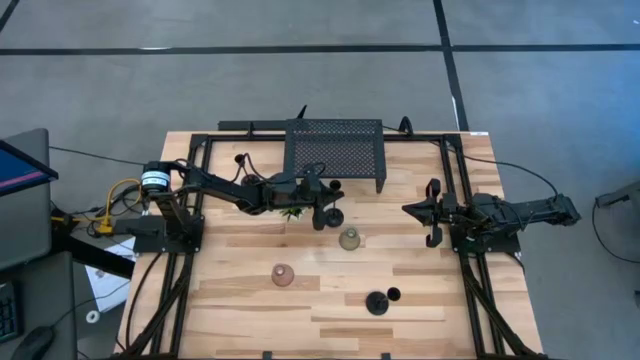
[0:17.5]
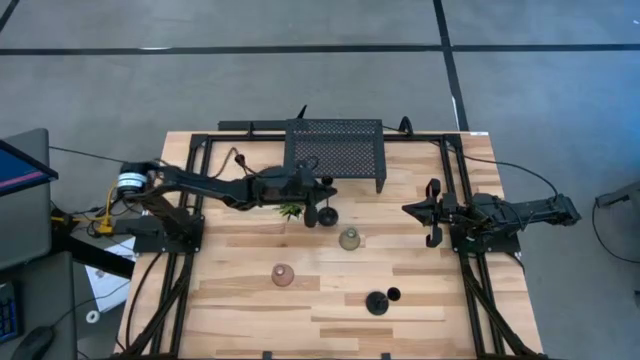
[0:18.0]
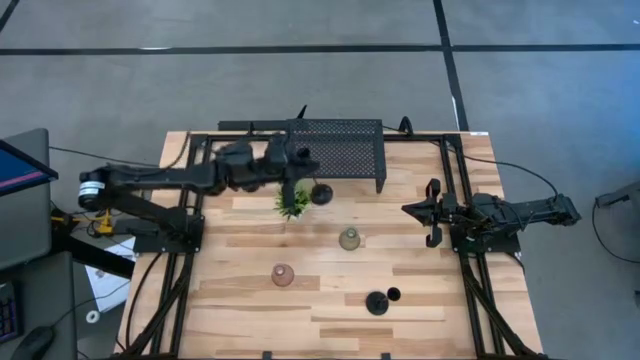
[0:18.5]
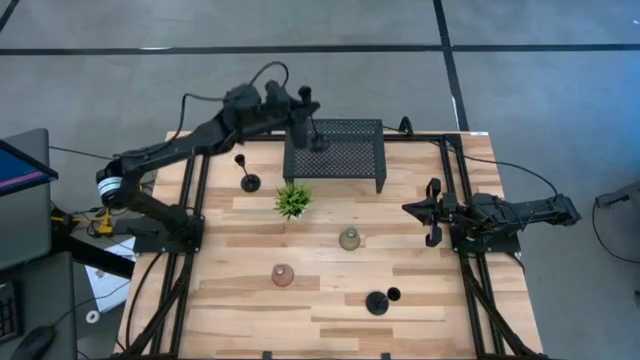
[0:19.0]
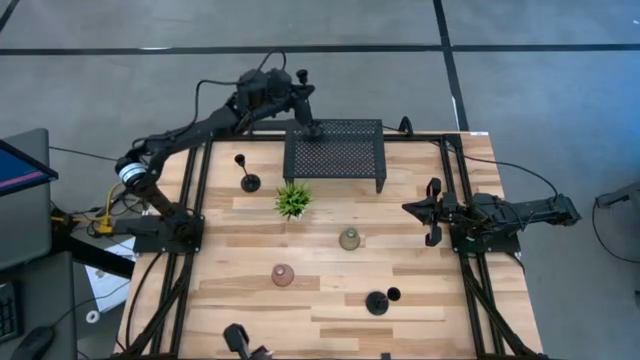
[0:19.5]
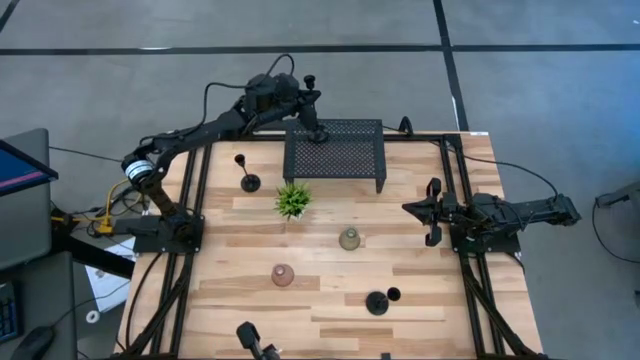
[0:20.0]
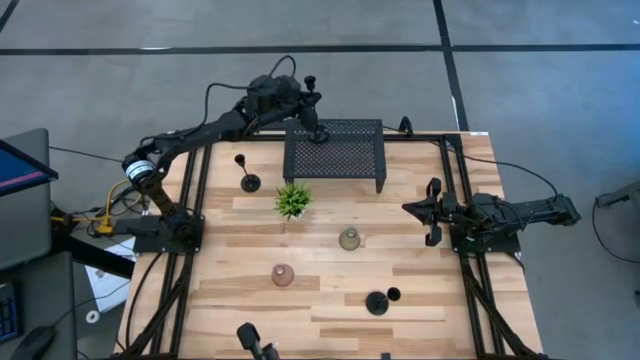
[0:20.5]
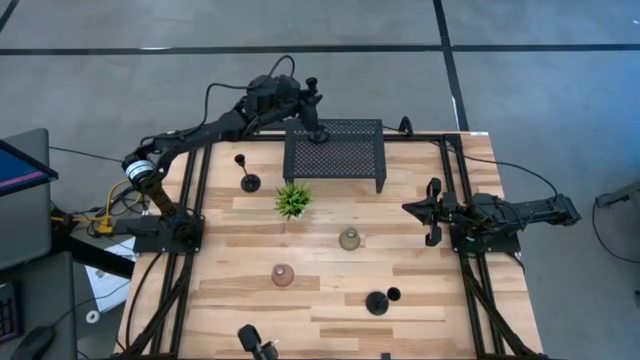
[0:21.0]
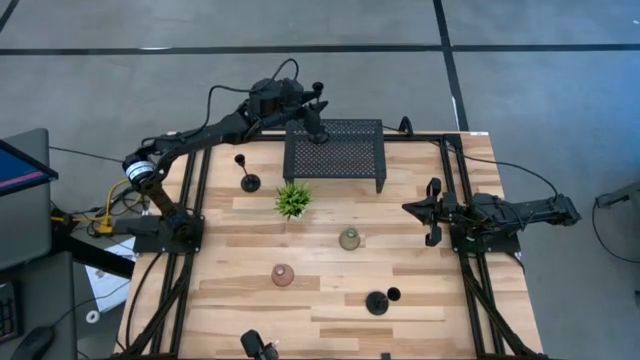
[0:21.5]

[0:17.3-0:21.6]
Task: Pick & Place candle stick holders
Put the middle black candle holder on the shelf

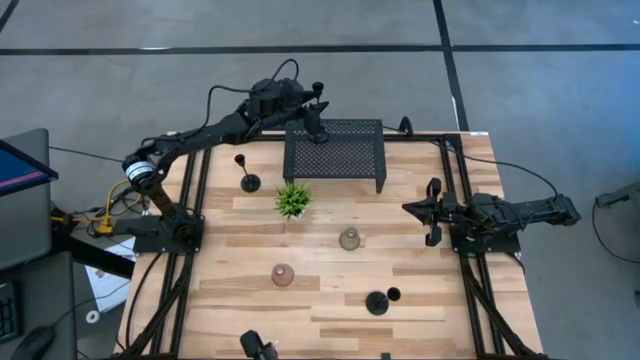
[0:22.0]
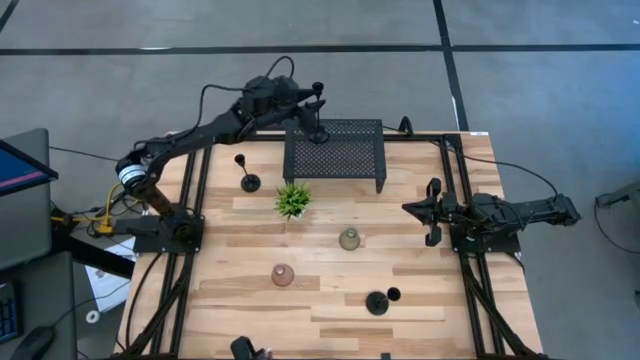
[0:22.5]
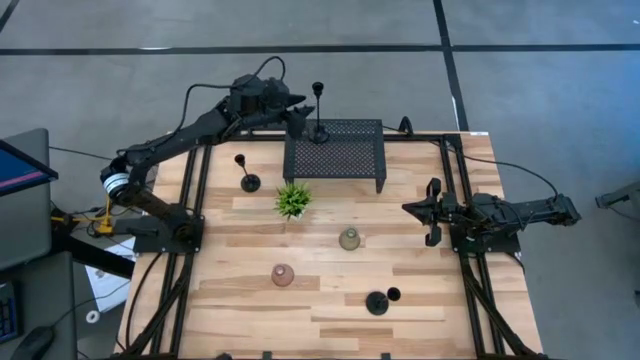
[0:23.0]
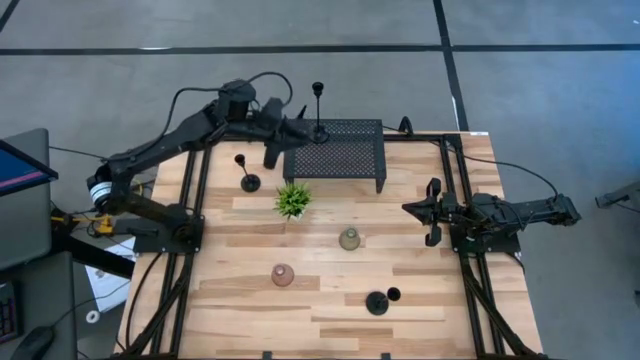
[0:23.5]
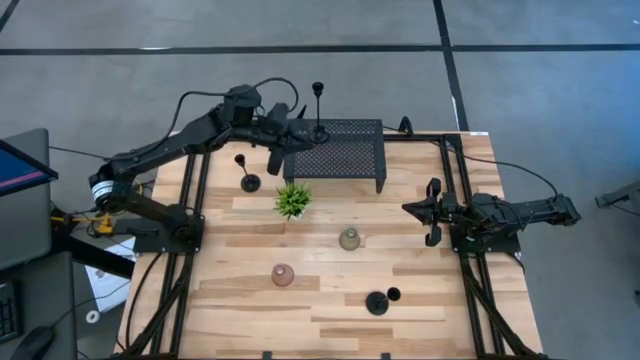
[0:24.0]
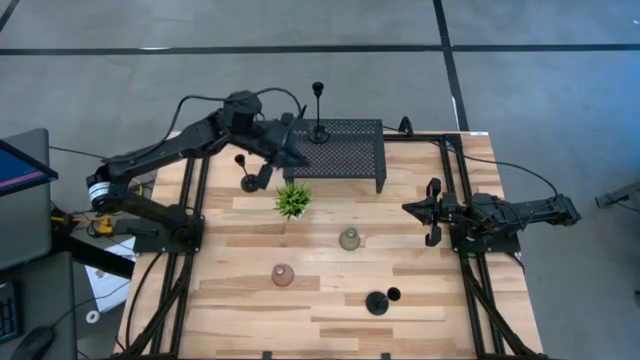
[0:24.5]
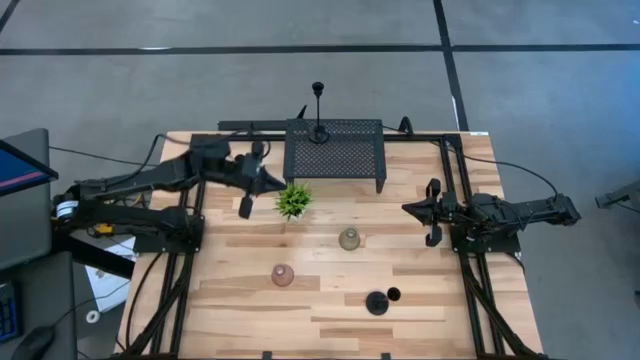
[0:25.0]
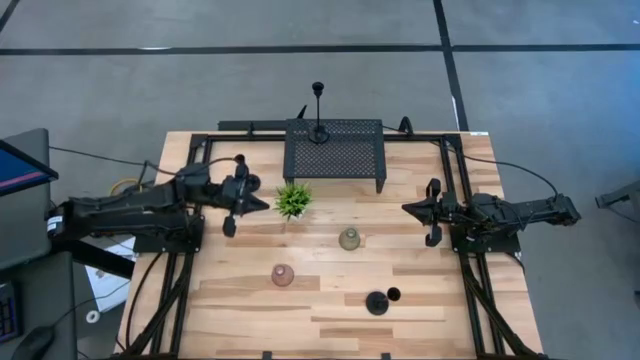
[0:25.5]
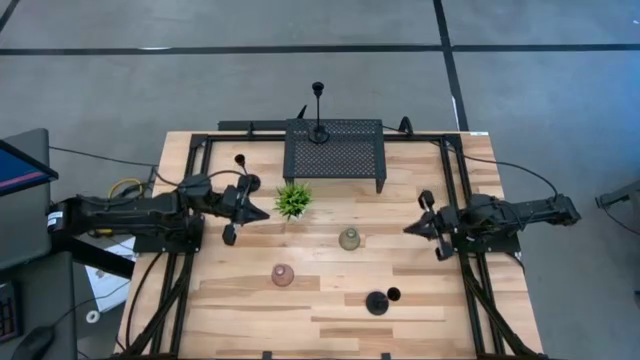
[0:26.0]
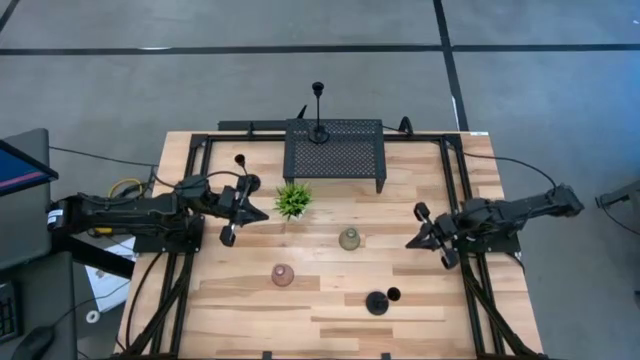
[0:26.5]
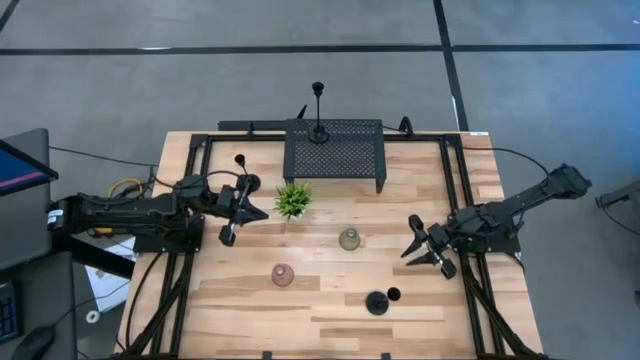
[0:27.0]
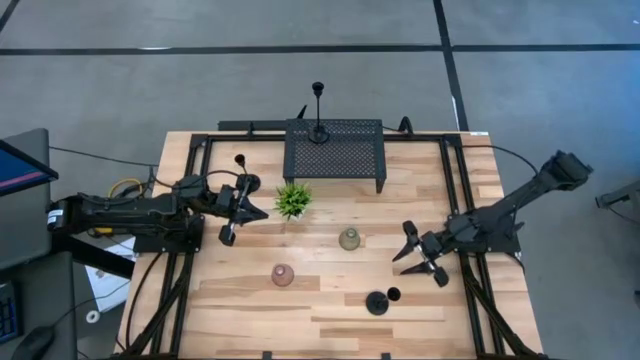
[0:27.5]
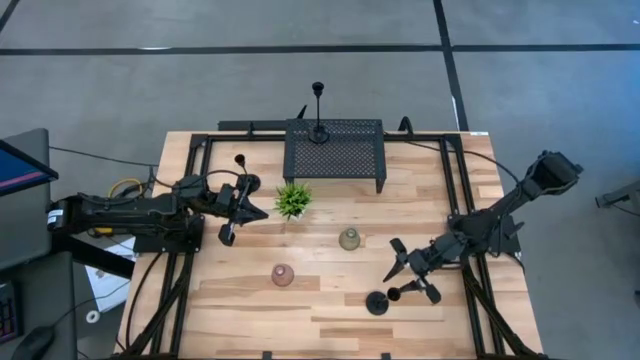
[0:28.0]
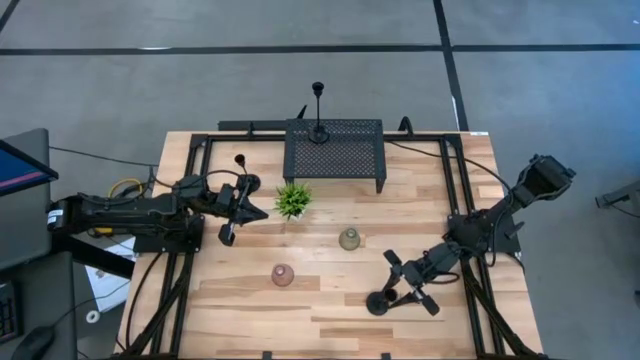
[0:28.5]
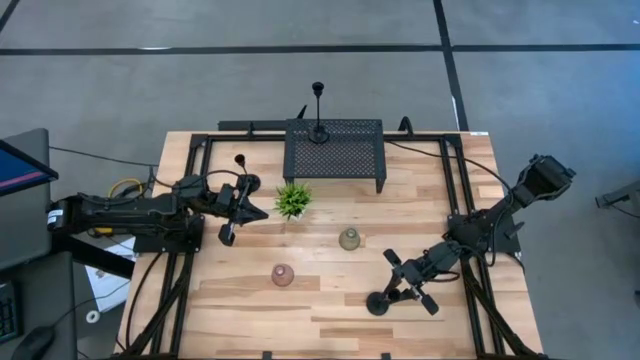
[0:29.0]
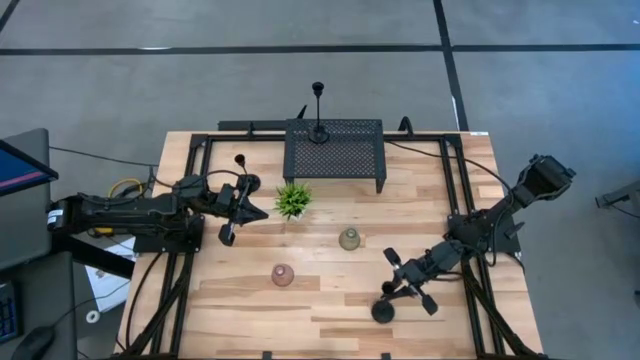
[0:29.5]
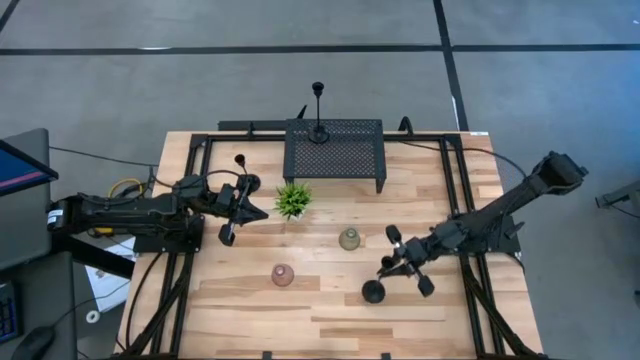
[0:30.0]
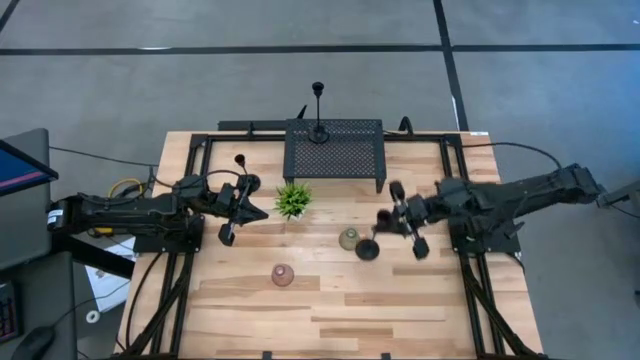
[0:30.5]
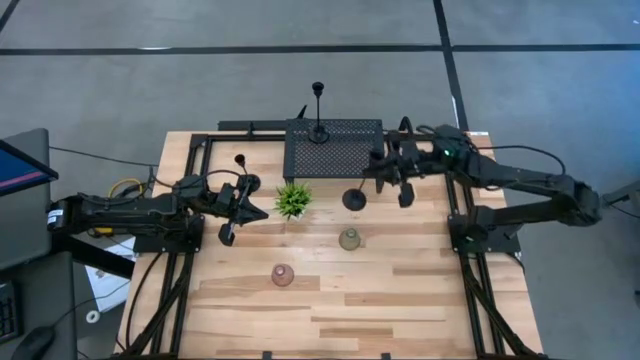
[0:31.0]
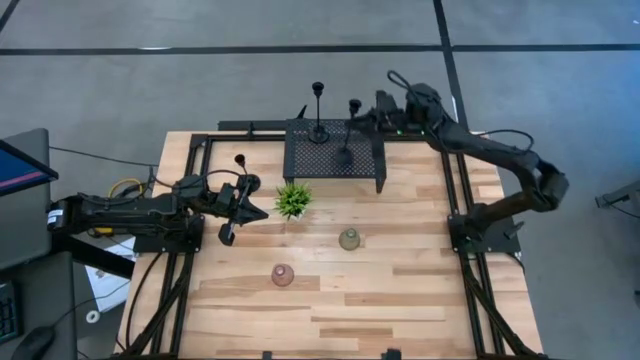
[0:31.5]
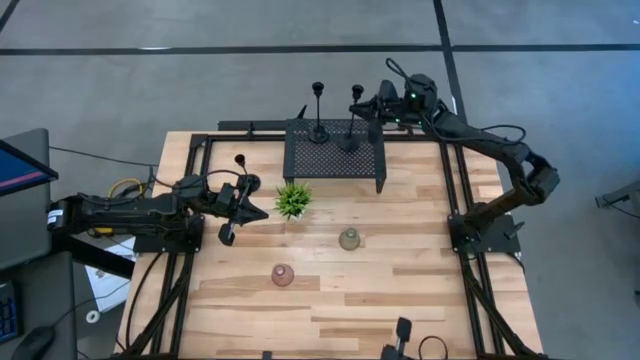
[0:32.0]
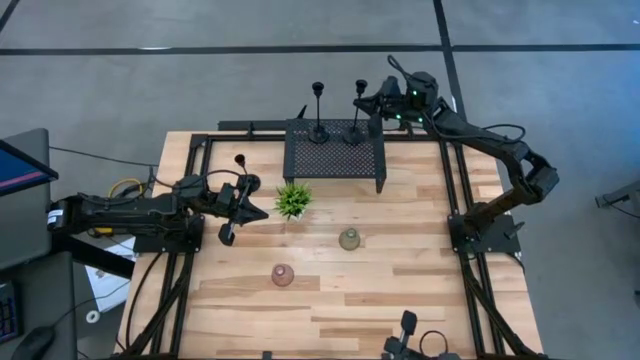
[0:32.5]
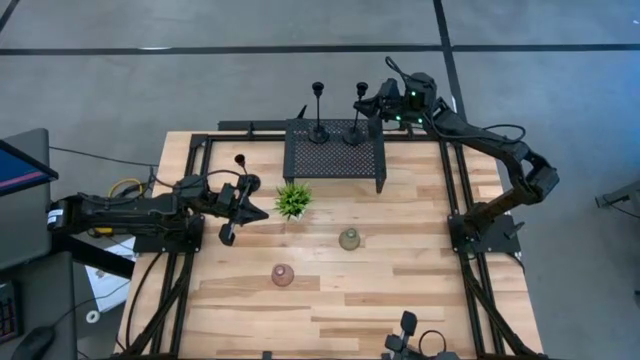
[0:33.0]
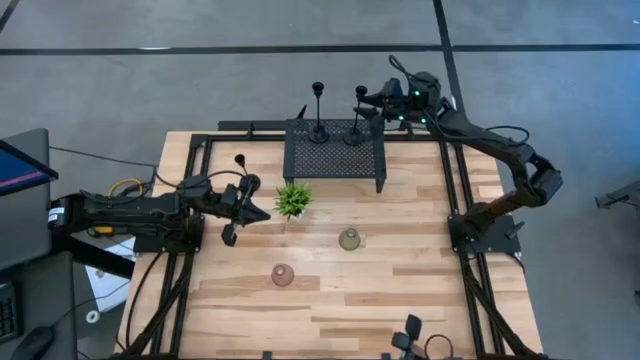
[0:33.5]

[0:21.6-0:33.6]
Put the bottom black candle holder on the shelf

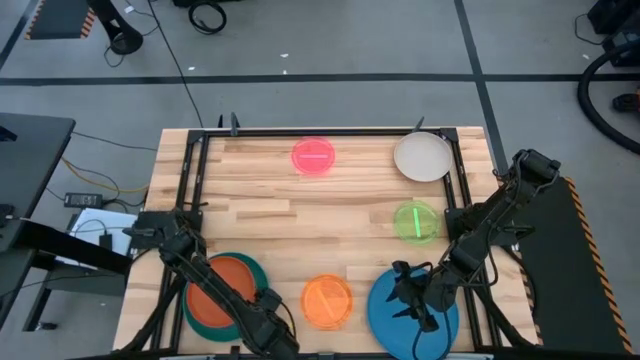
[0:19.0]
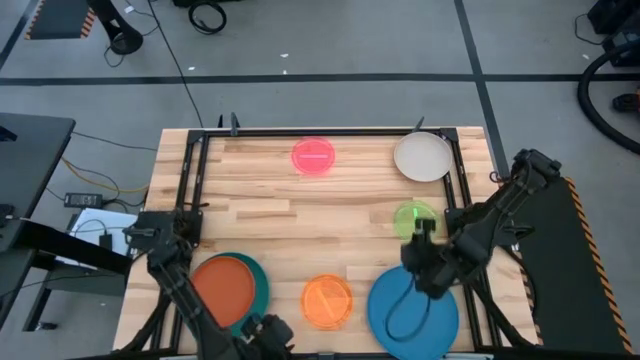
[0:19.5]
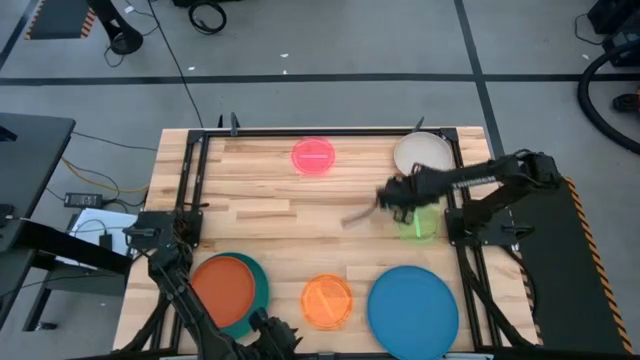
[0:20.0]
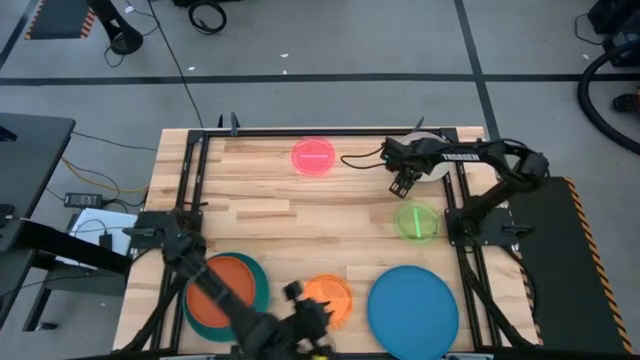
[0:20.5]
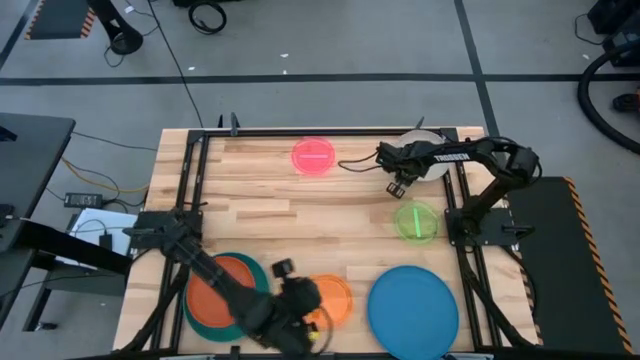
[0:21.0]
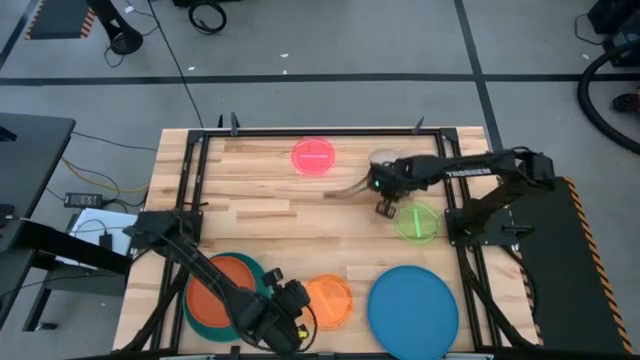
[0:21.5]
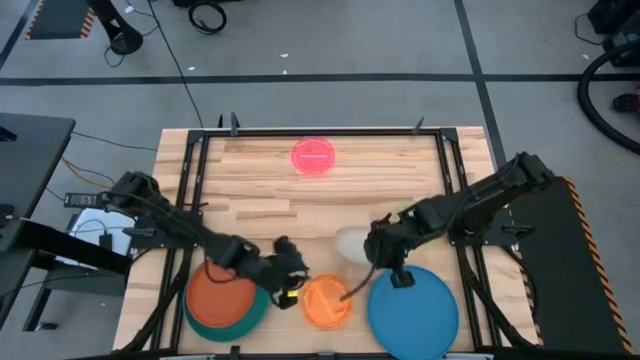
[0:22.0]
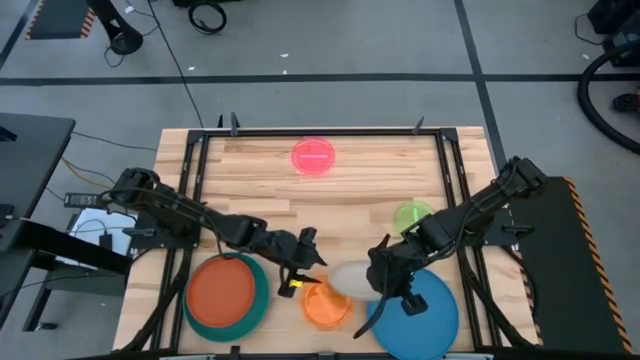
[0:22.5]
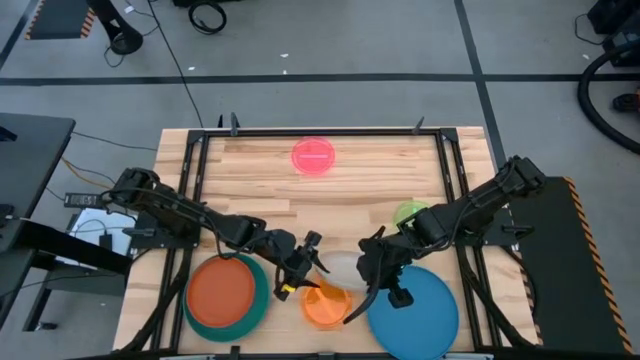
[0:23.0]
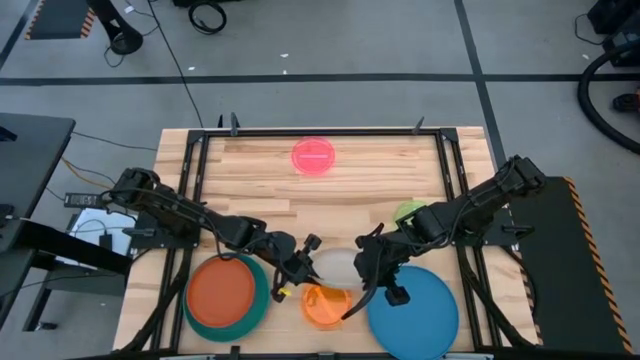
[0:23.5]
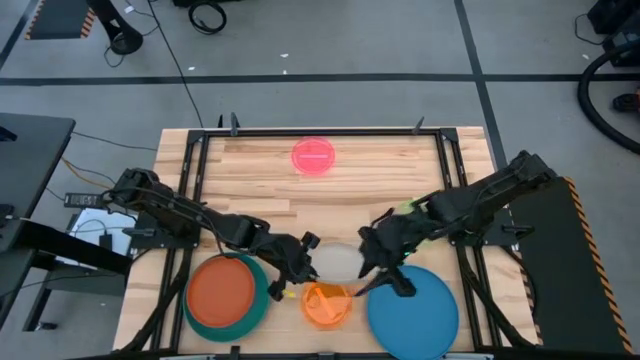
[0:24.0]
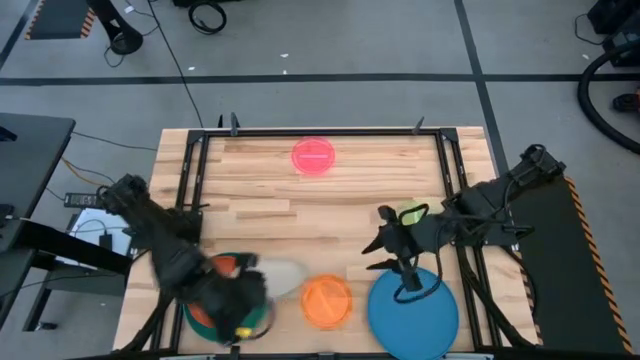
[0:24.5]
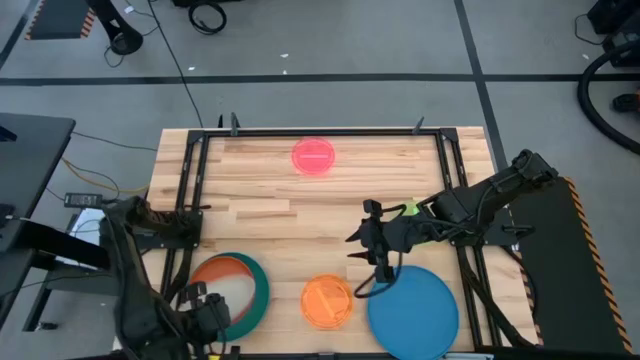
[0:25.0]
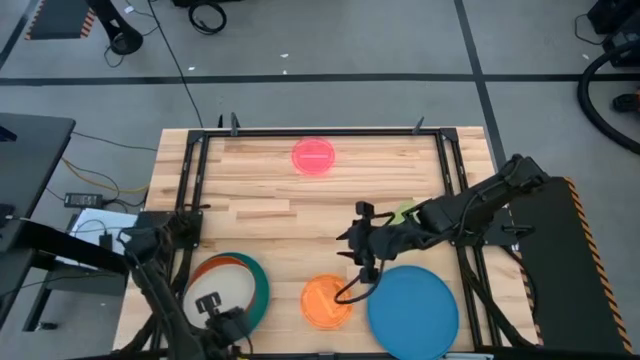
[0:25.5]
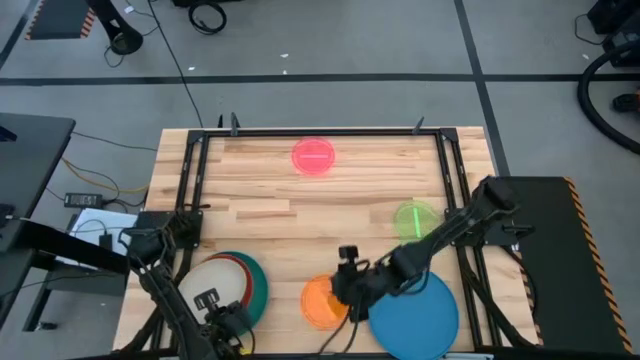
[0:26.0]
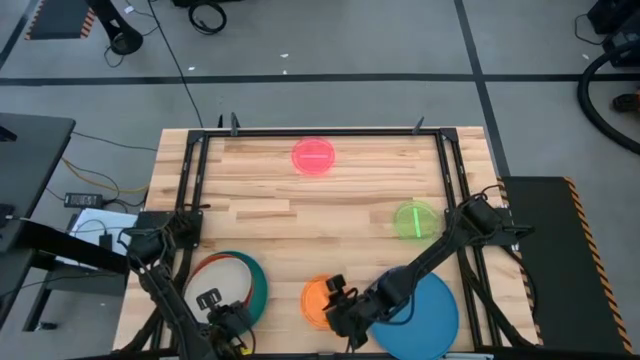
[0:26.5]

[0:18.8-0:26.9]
Task: Stack plastic plates
Stack the gray plate on top of the orange plate
